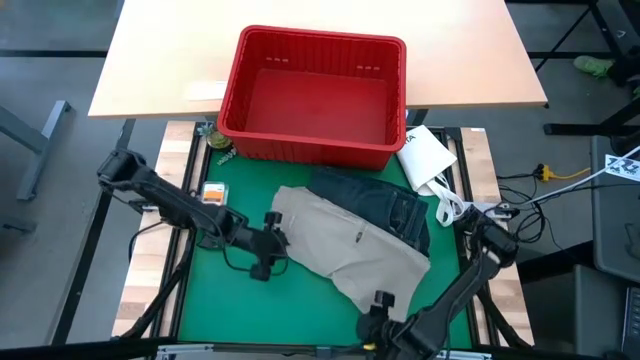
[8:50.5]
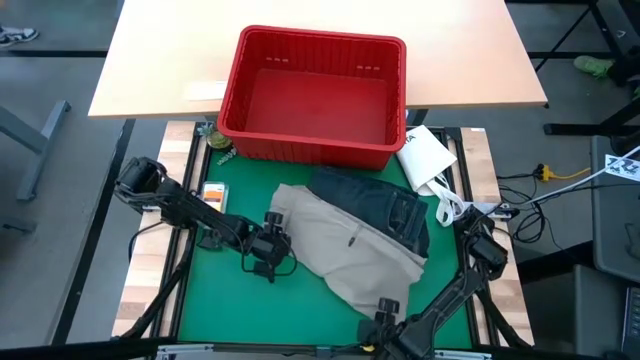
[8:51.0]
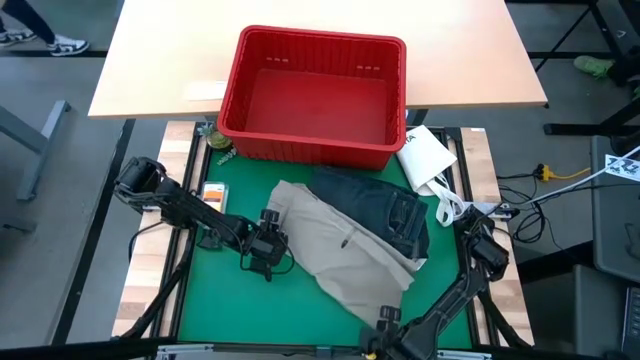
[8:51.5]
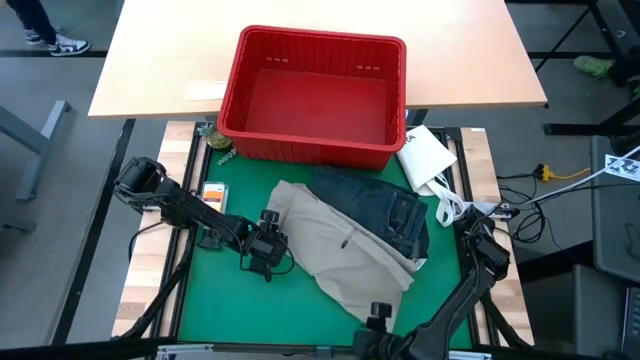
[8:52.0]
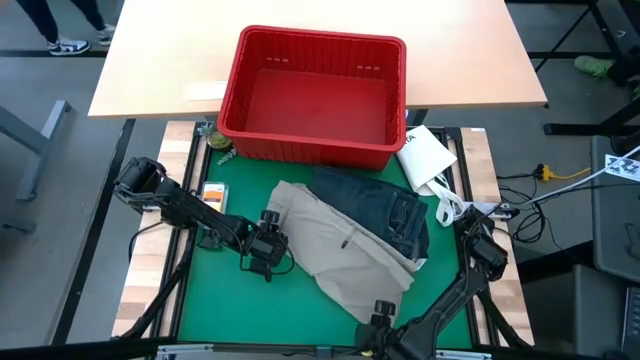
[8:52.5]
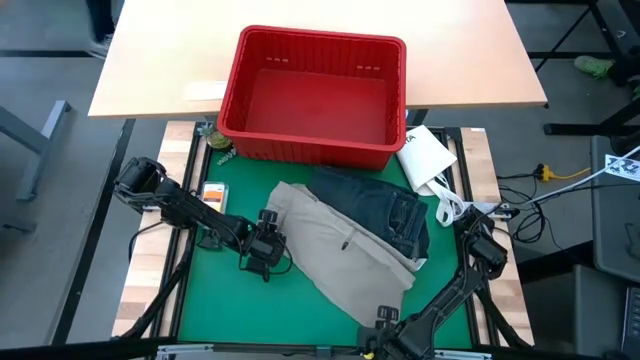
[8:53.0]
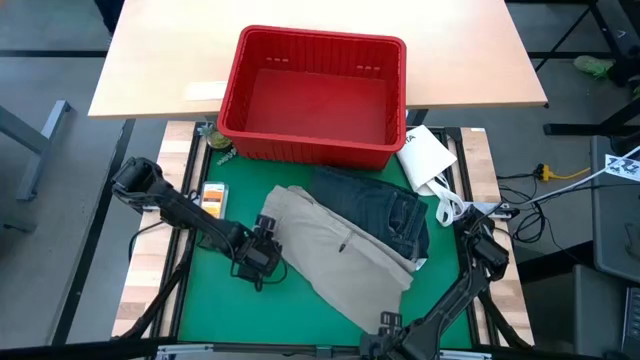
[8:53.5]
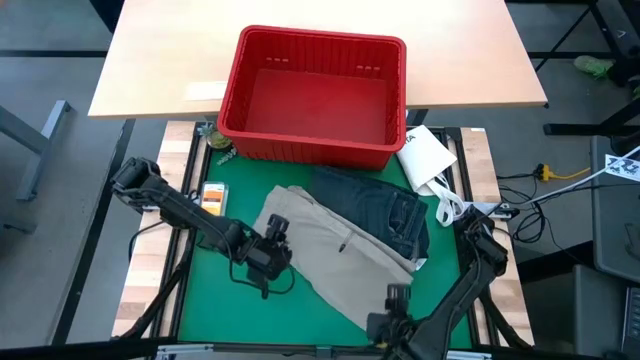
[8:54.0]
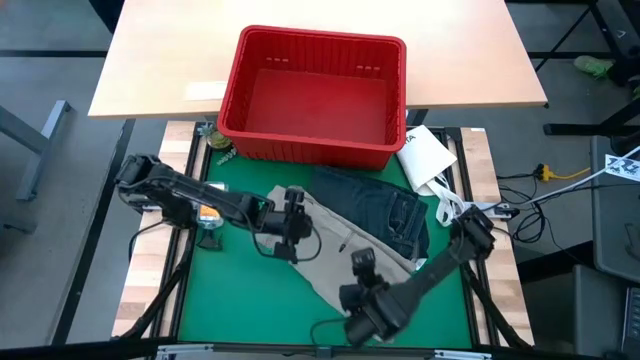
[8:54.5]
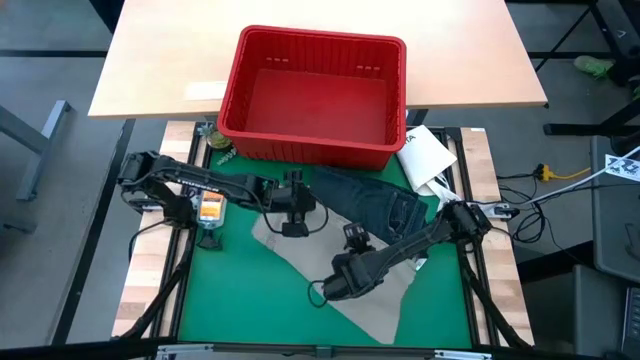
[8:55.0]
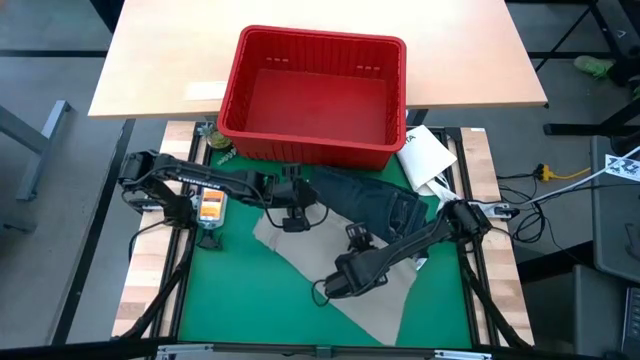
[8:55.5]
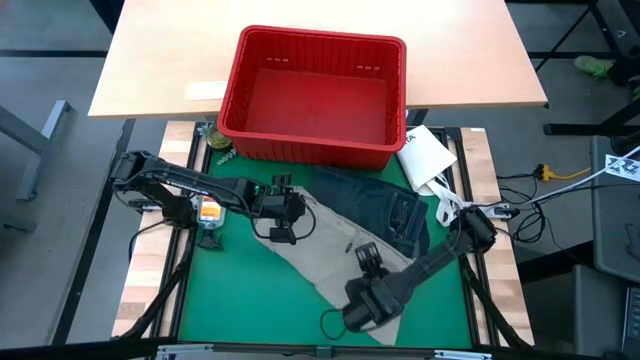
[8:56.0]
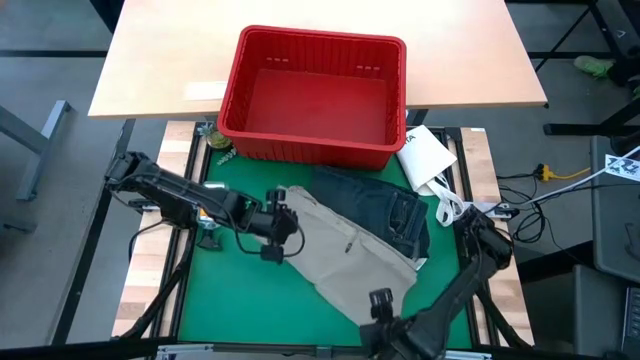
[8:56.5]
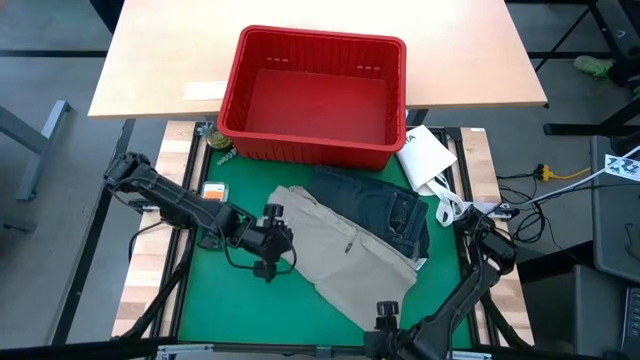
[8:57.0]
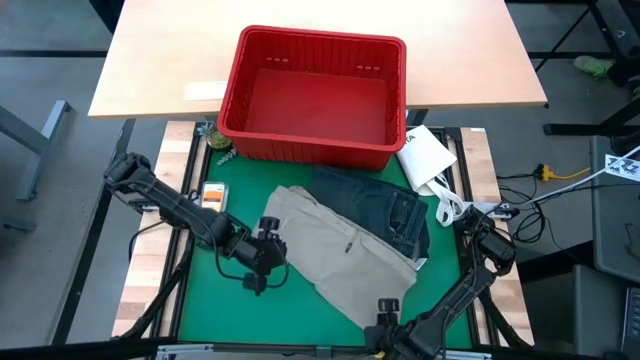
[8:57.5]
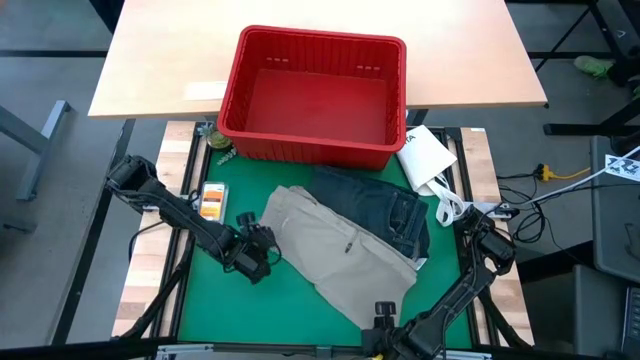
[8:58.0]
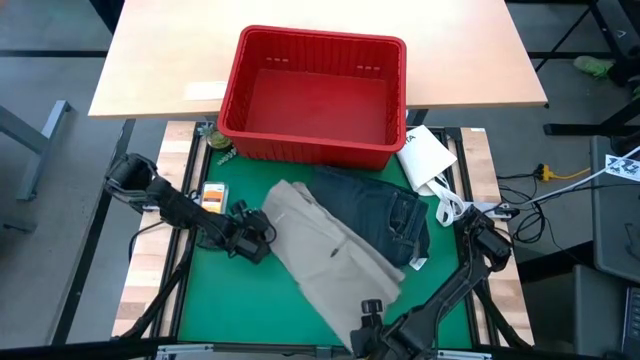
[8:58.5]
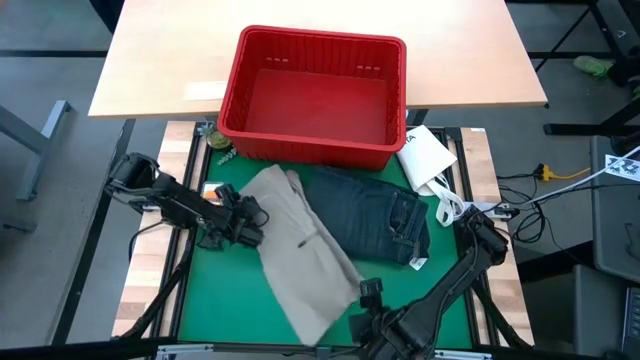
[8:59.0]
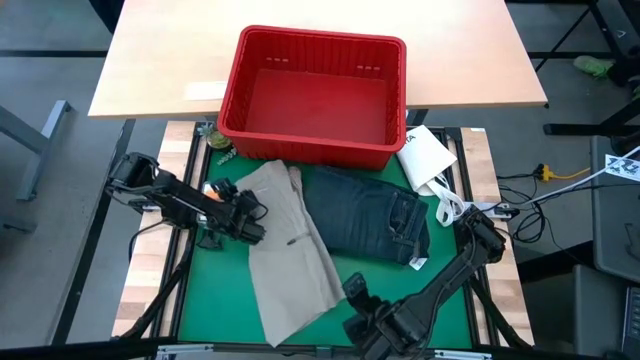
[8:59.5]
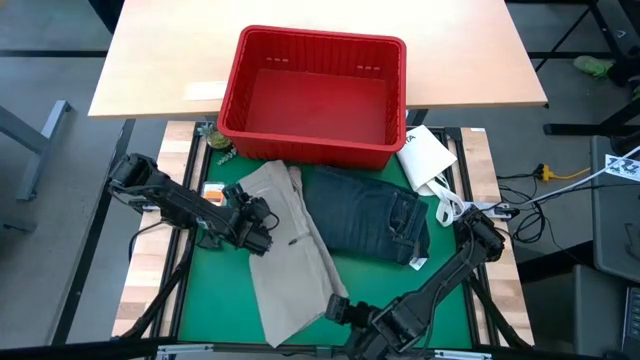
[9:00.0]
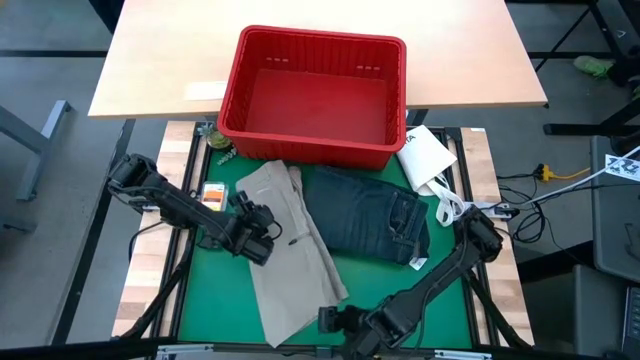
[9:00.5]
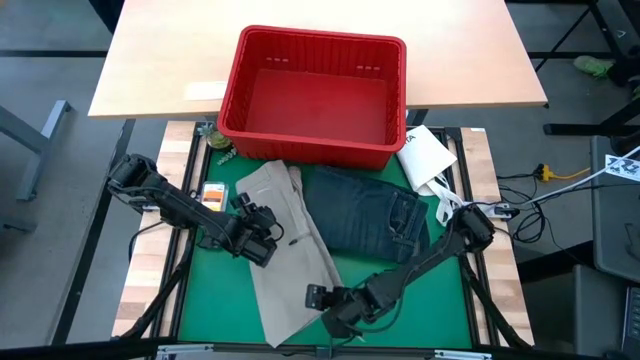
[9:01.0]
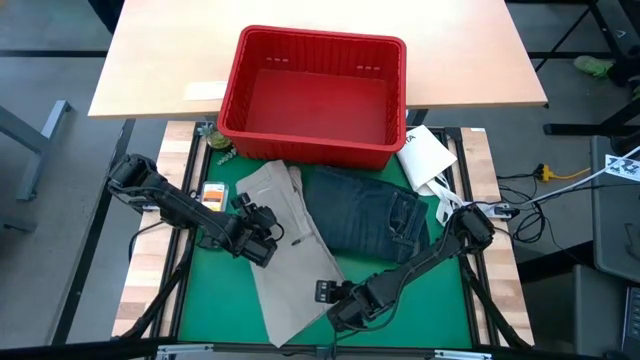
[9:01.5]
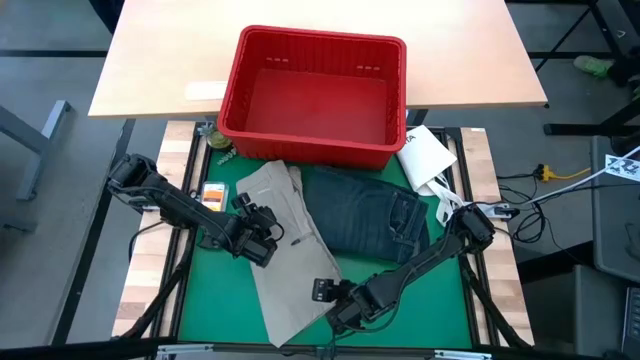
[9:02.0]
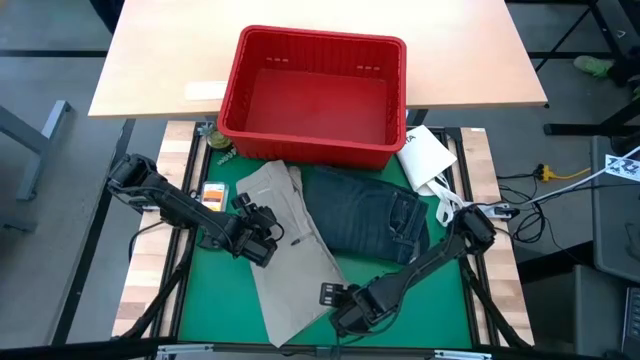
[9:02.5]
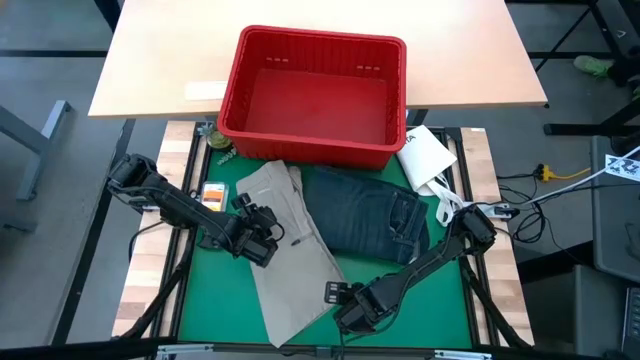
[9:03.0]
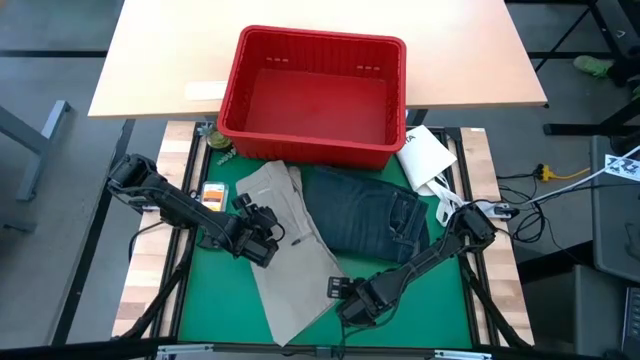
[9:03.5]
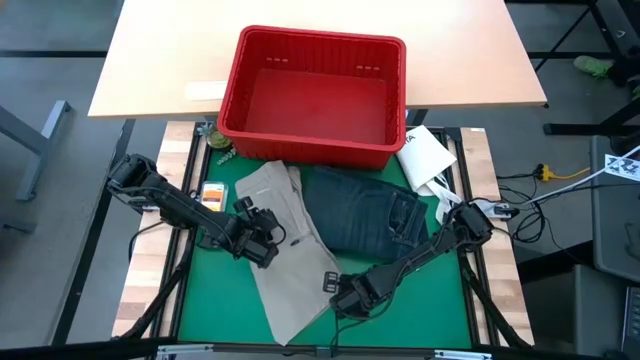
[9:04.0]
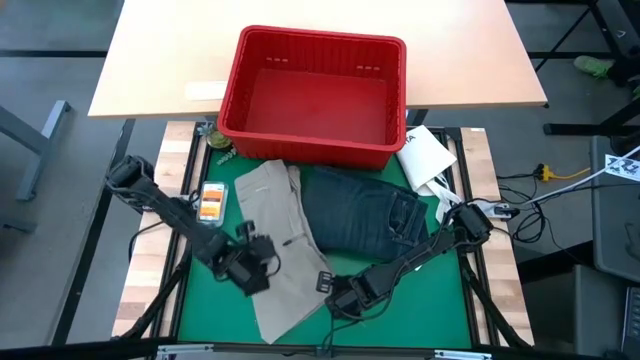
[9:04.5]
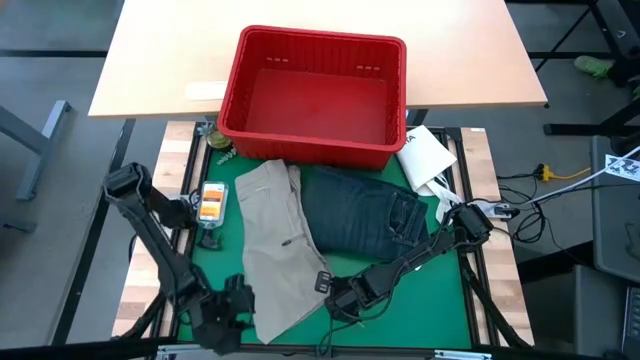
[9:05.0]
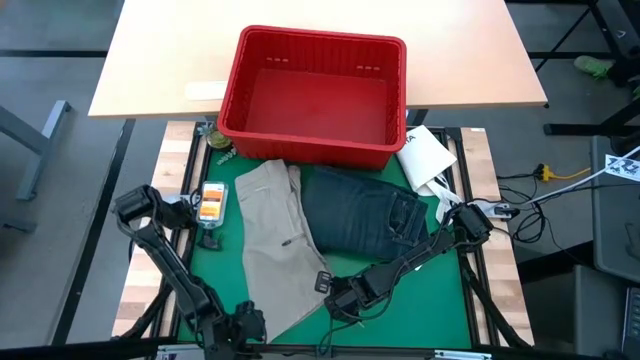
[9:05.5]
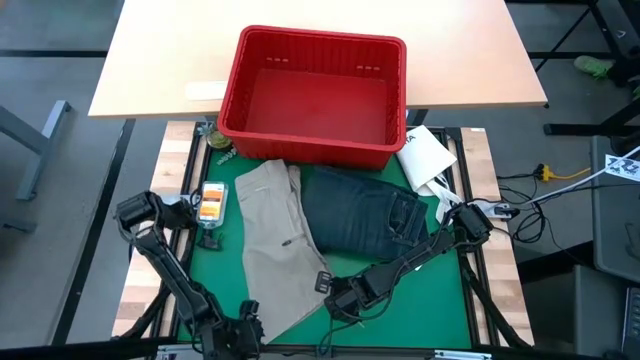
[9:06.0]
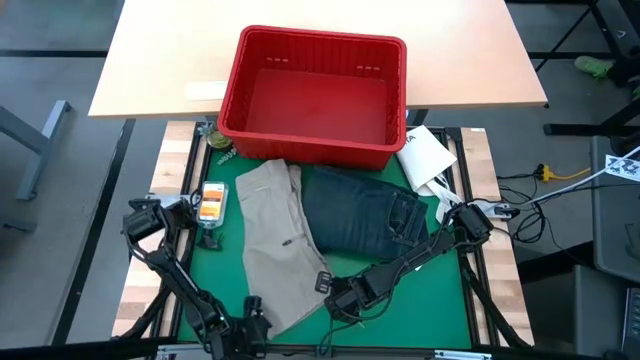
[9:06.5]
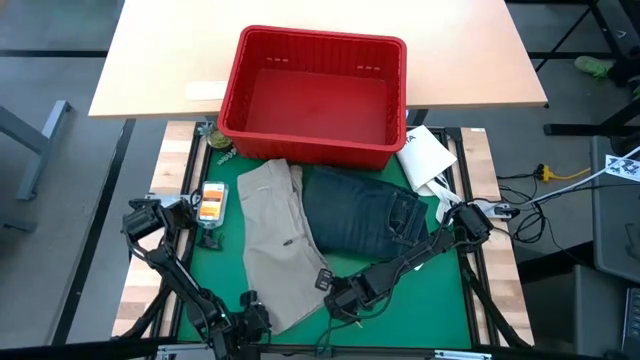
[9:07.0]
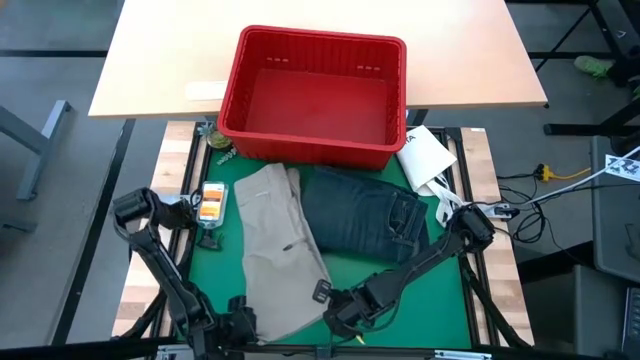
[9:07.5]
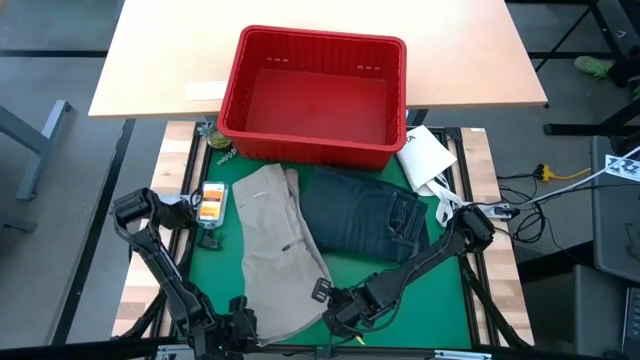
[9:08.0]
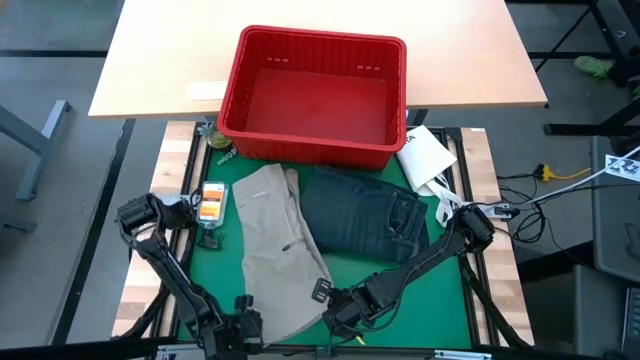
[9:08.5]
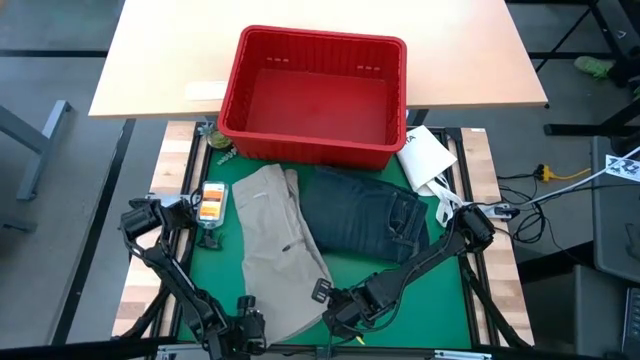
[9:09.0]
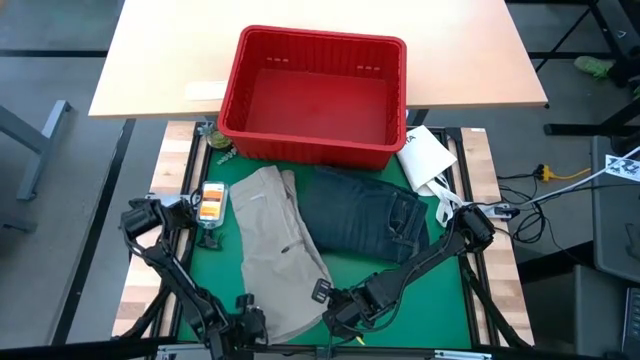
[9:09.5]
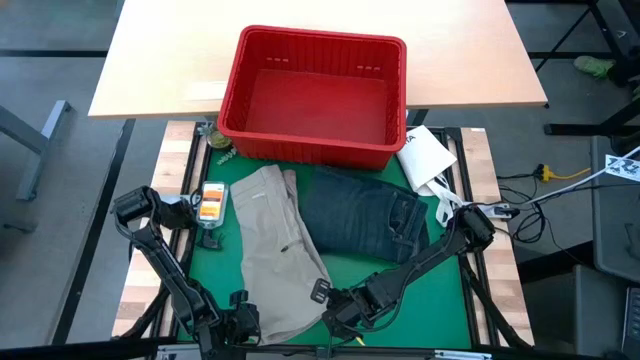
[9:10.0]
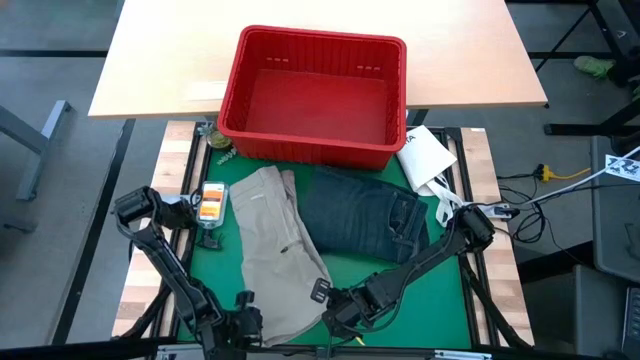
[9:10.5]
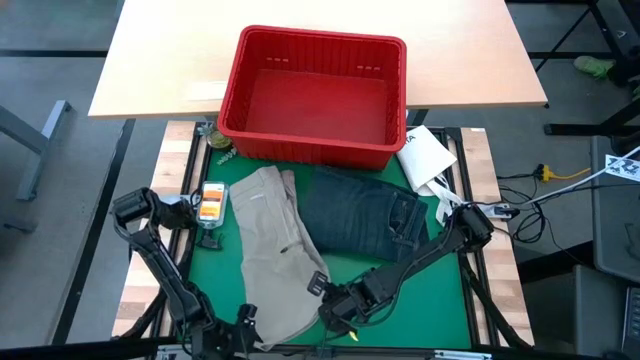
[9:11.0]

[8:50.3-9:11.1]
Task: Fold Laundry from Bin
Fold the gray shorts
